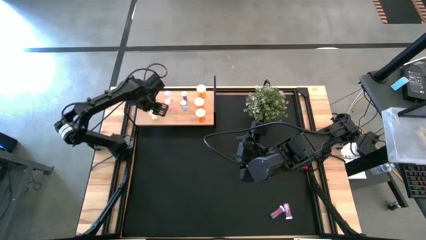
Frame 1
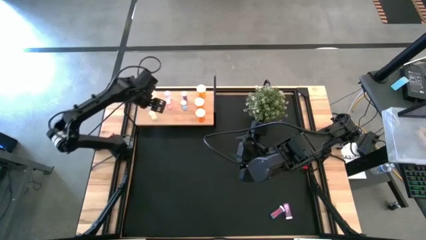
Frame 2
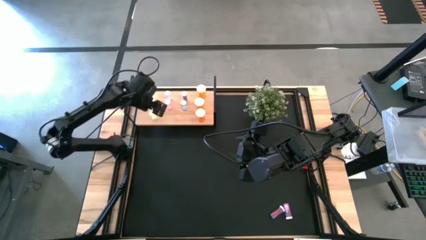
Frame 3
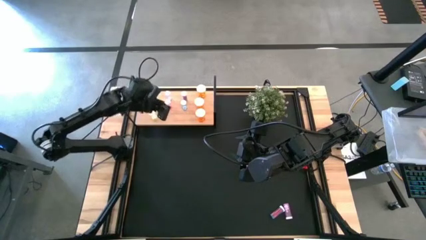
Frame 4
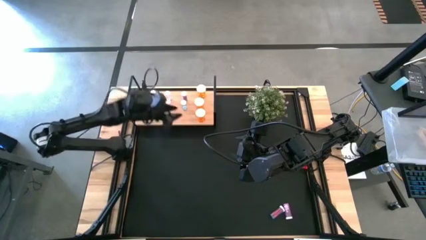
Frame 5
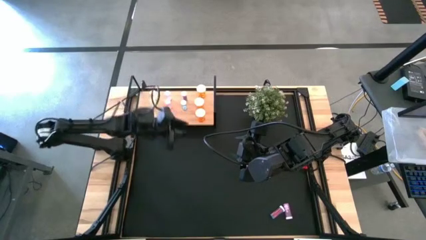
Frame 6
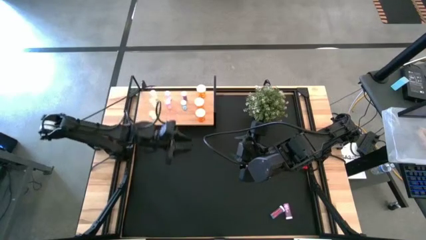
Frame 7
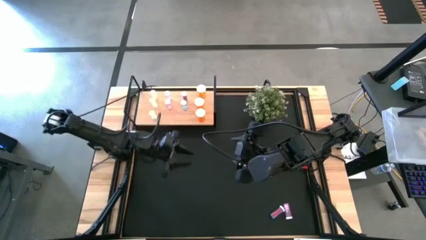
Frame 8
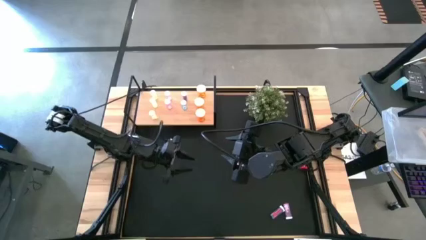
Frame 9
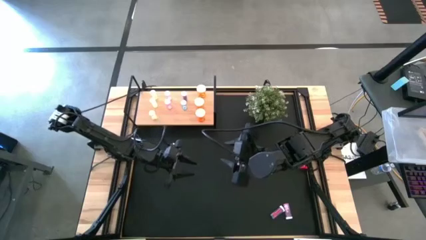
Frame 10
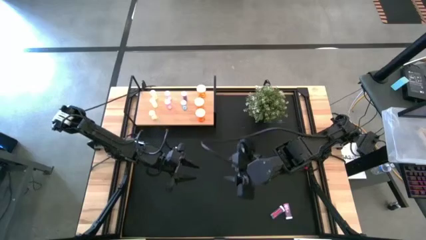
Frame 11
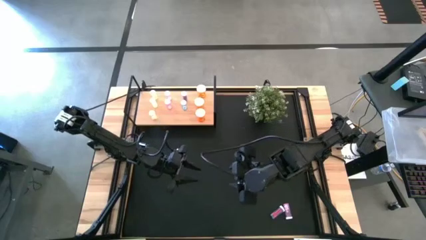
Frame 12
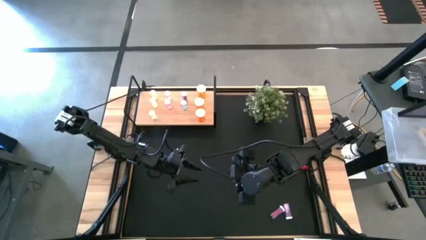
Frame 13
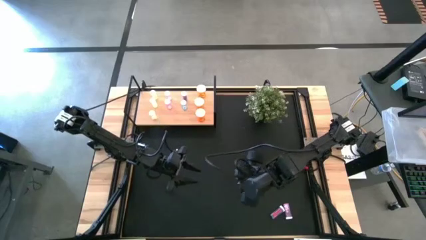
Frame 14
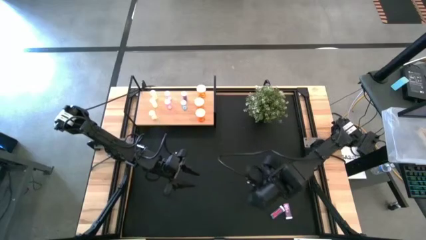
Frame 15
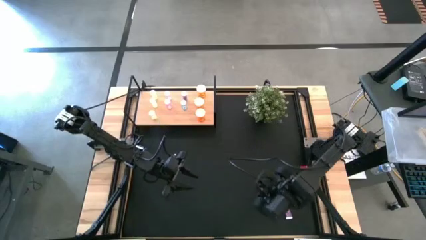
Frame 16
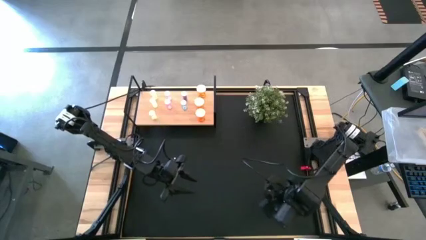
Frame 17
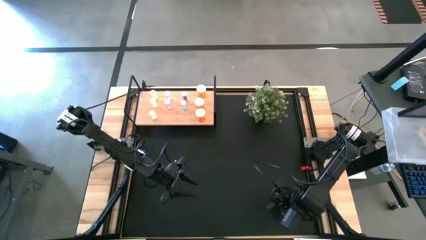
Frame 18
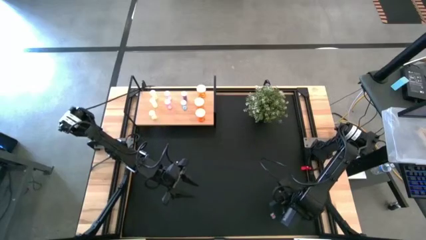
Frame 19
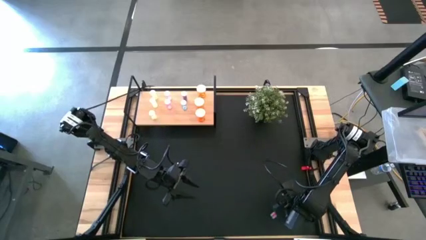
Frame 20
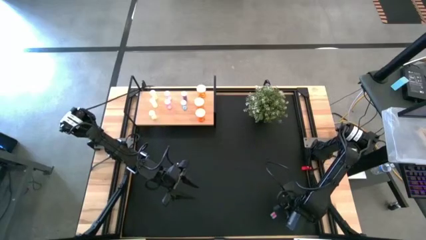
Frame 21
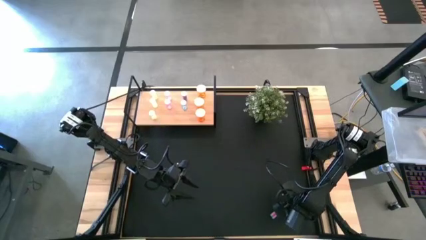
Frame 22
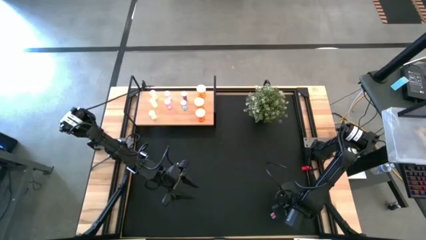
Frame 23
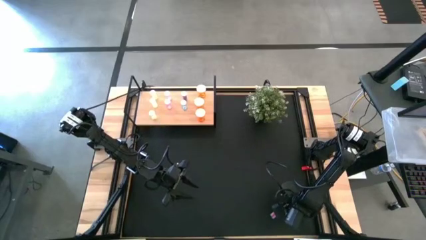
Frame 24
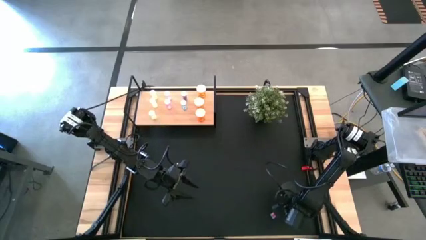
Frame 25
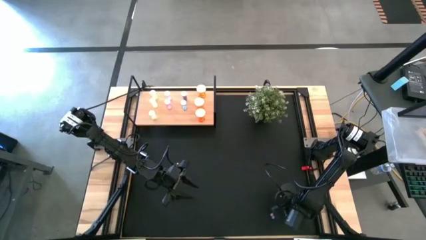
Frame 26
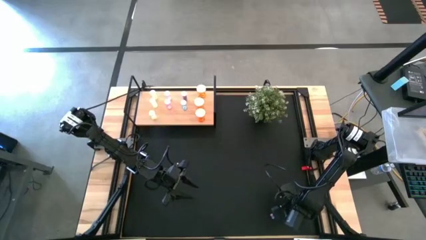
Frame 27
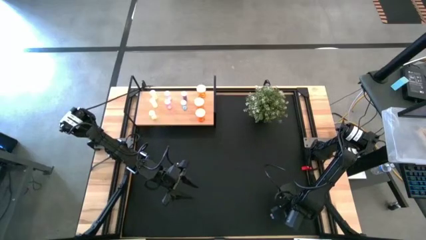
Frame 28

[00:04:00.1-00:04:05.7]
Task: Pick and place medicine bottles onto shelf by color
Put the pink medicine bottle on the shelf aligned with the other pink medicine bottles

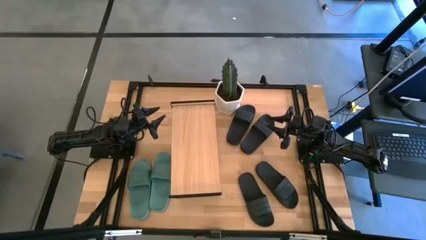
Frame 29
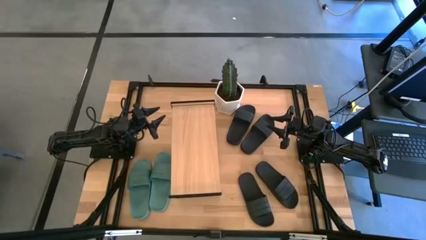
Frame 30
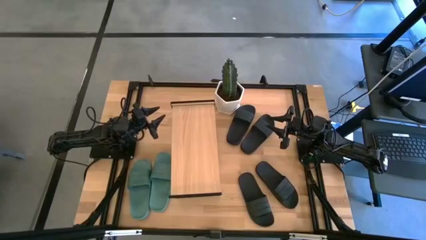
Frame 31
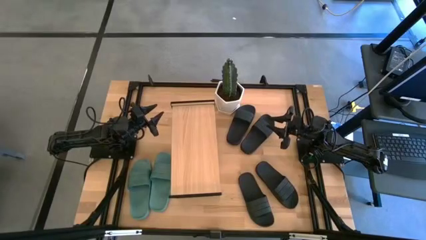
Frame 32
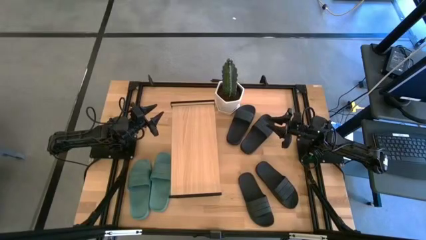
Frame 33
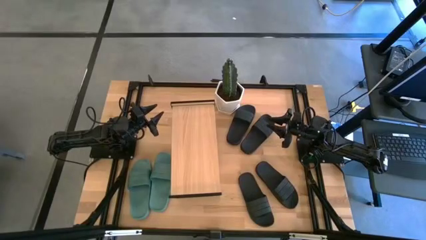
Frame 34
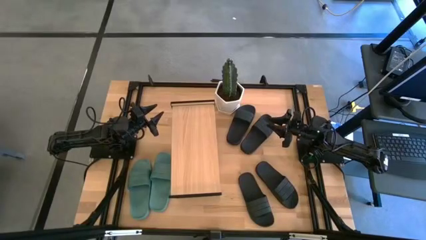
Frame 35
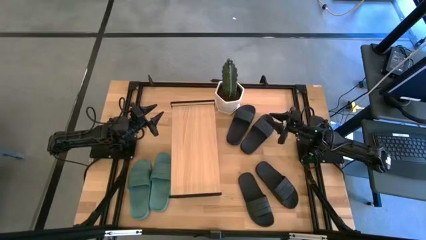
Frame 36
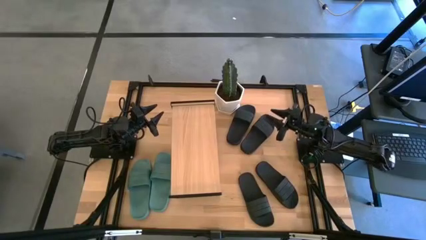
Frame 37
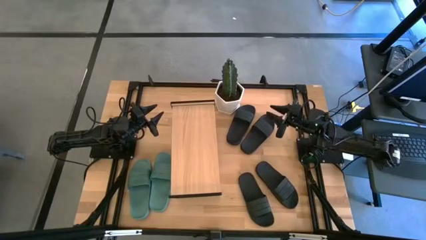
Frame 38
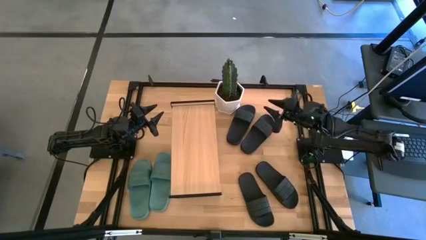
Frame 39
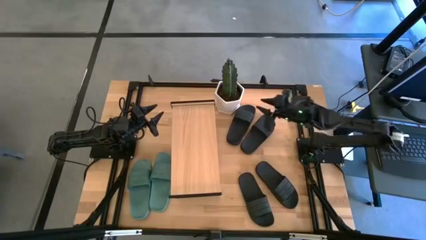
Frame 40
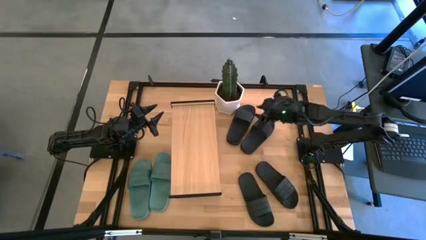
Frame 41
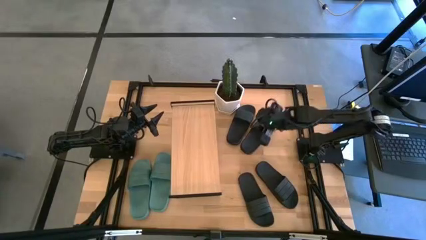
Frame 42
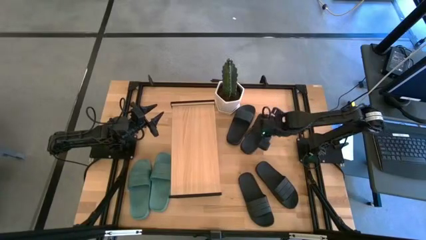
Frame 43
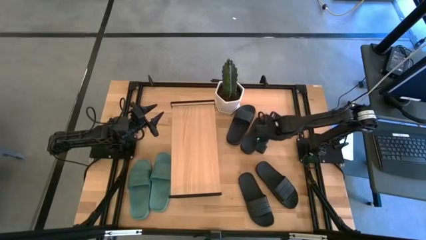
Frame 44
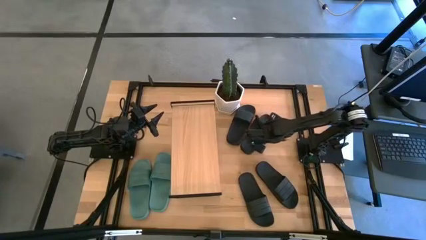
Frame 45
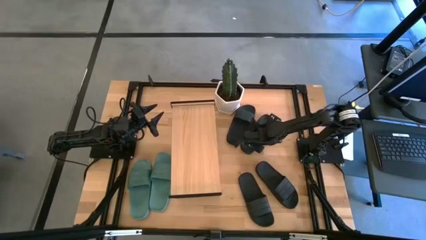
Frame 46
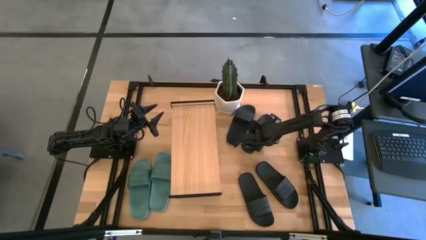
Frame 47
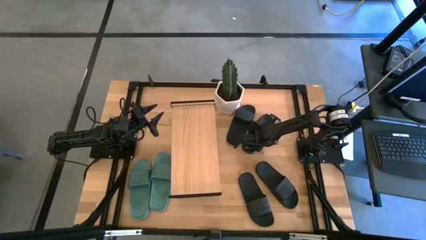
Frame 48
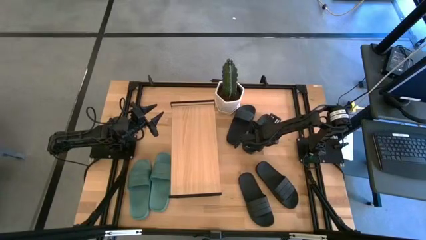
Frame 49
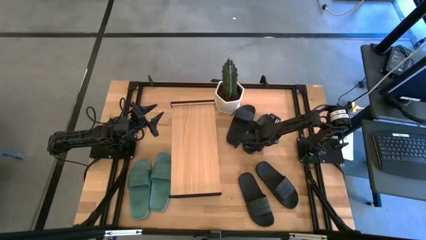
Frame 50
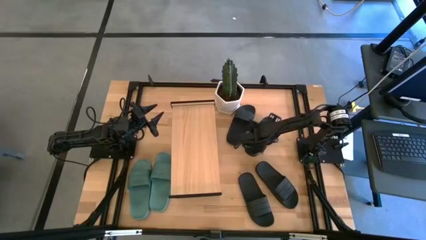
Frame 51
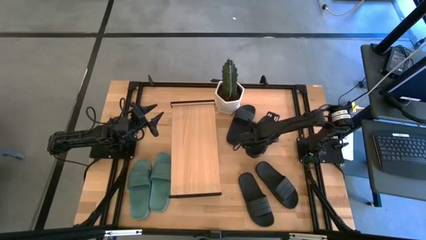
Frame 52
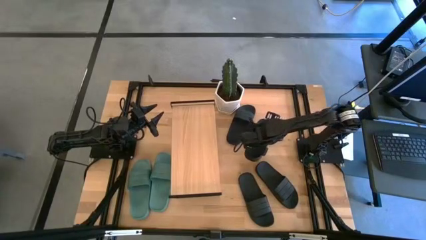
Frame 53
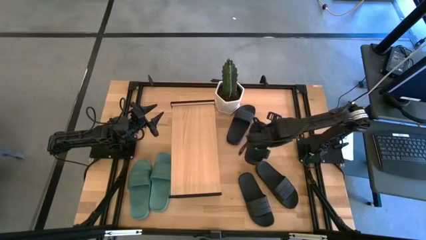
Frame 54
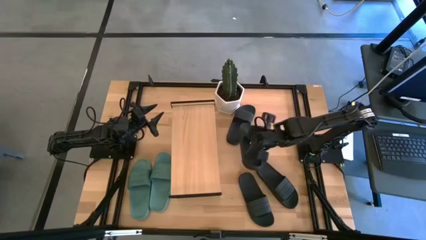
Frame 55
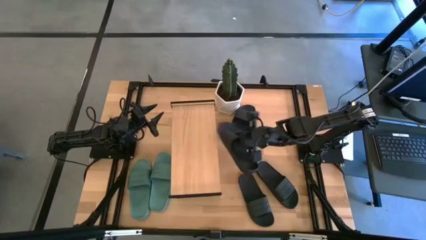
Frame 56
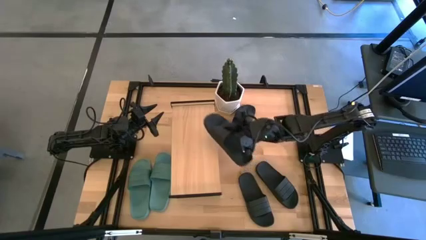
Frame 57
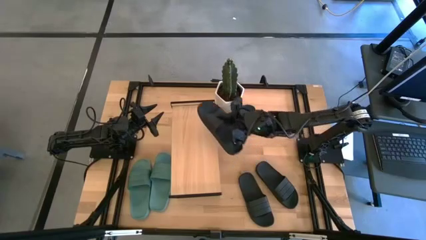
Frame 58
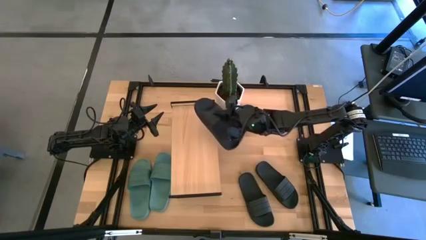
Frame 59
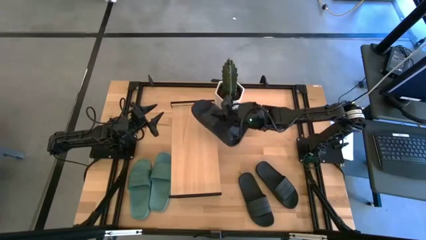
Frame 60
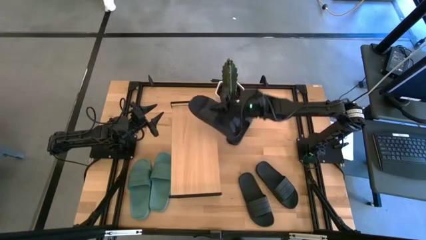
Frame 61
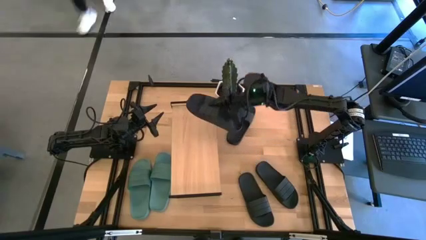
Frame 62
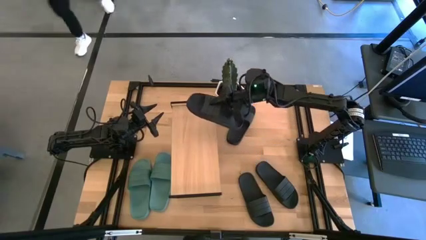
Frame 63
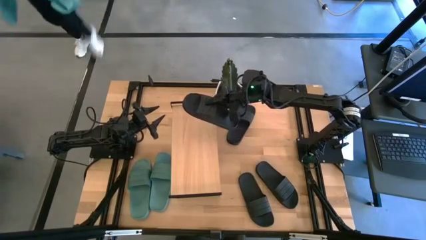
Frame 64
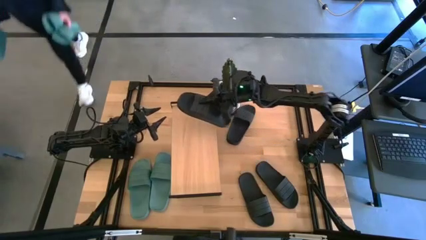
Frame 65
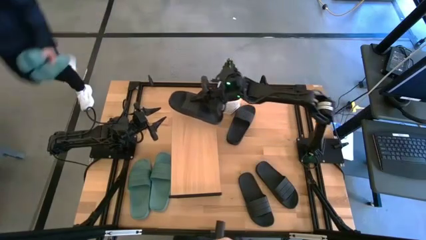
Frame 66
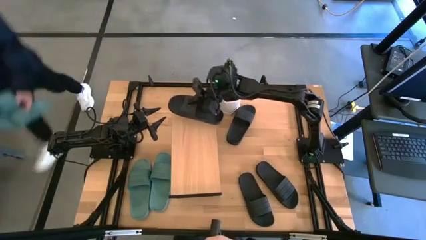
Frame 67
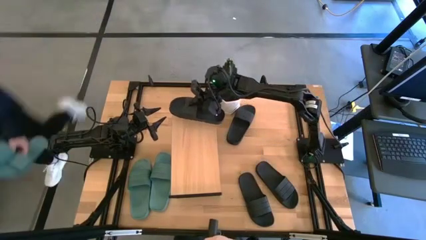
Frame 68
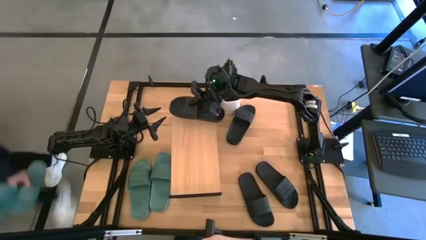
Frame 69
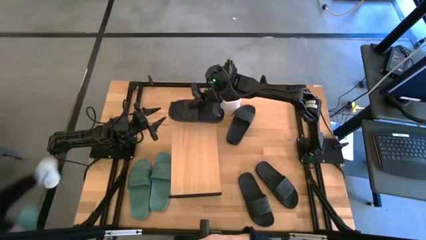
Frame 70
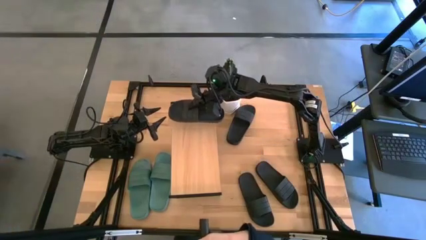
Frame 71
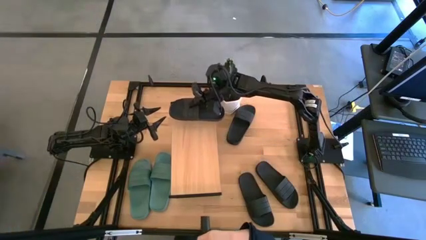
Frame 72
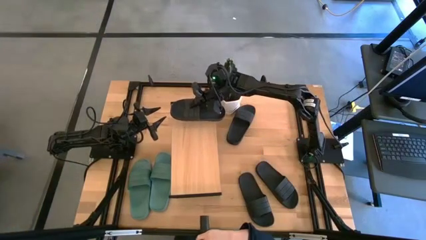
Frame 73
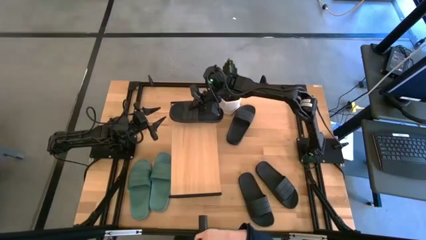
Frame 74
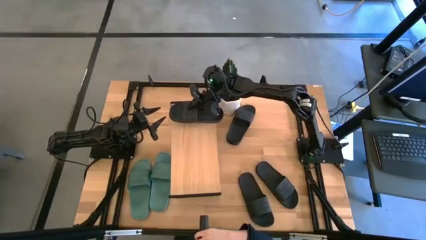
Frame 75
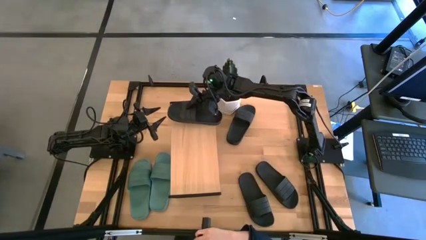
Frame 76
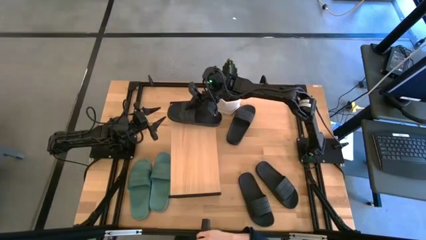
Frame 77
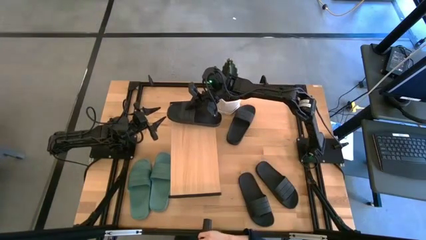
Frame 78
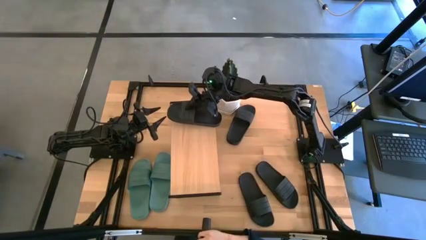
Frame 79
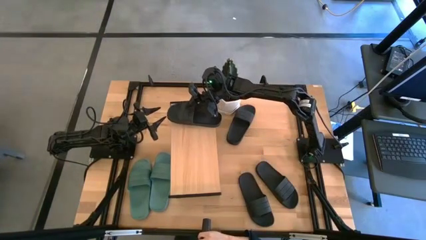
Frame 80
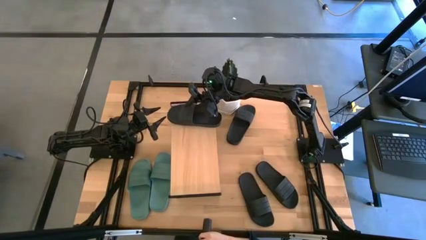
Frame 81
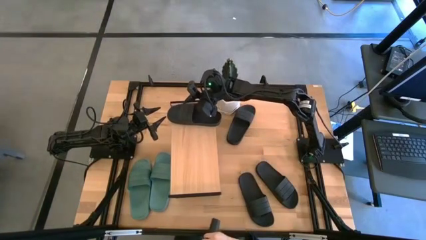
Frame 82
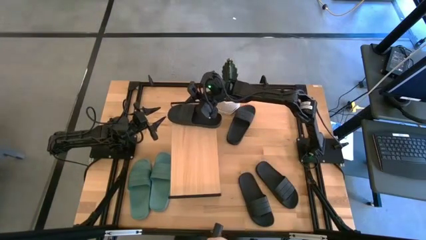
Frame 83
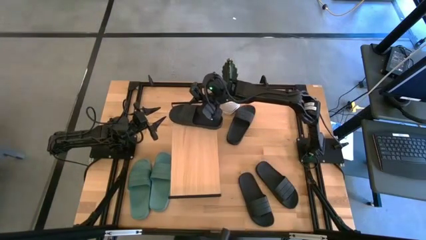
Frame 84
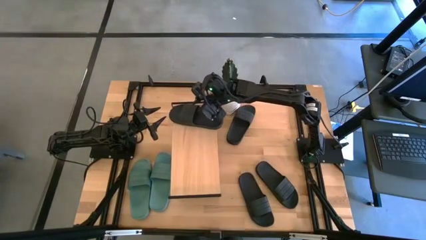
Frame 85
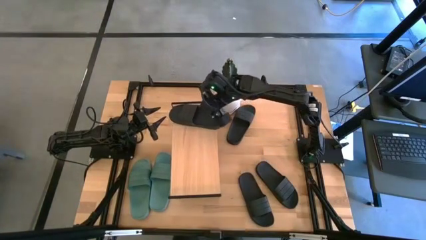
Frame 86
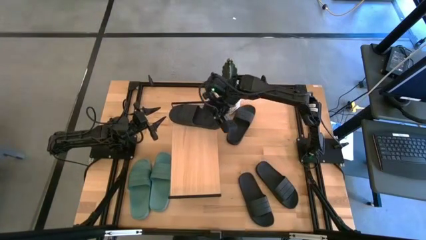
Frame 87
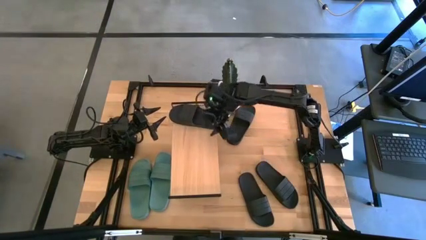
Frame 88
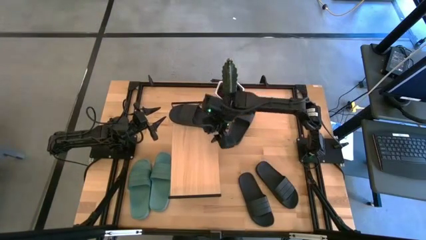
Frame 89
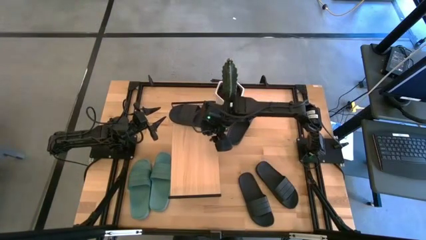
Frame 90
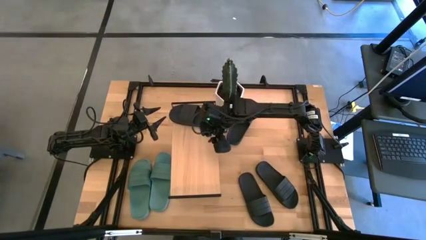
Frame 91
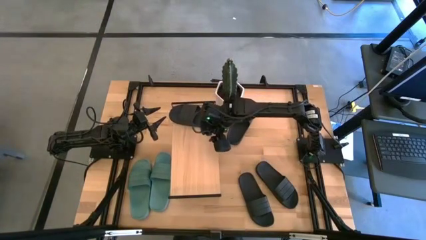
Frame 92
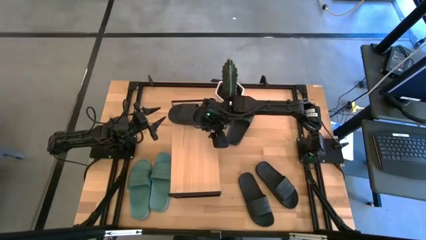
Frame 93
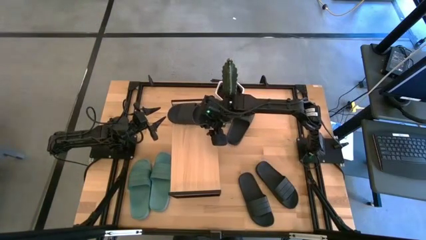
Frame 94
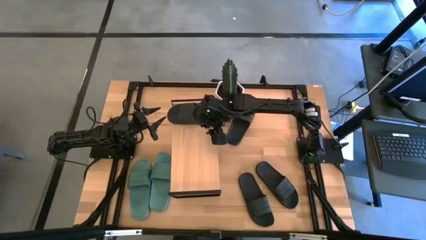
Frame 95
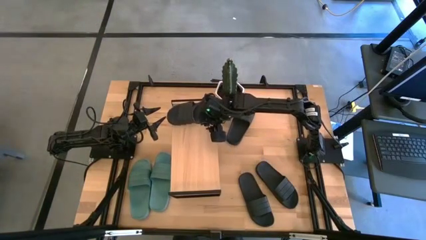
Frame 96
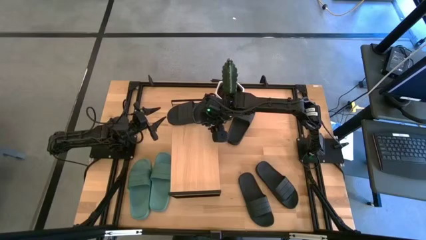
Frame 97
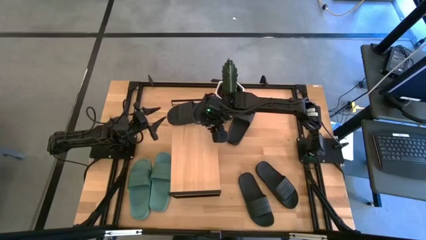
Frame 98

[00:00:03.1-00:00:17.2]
Task: Pick and place slides into the shelf
Put the black slides on the shelf
